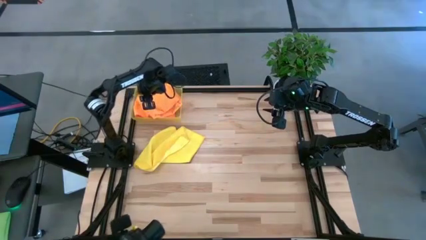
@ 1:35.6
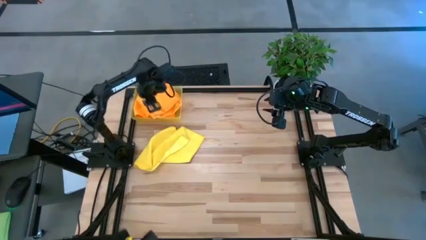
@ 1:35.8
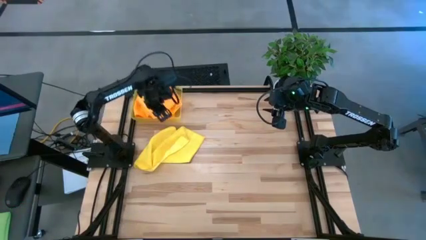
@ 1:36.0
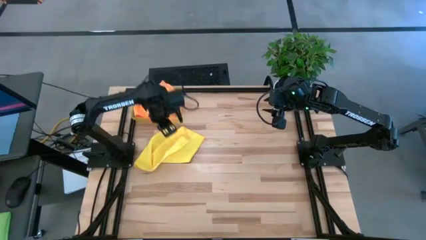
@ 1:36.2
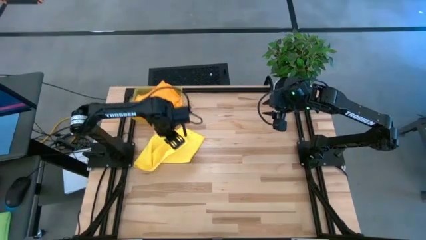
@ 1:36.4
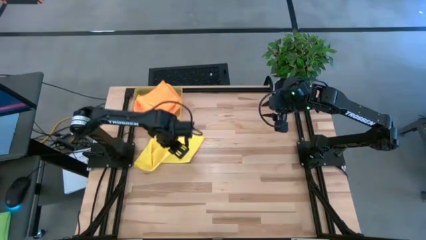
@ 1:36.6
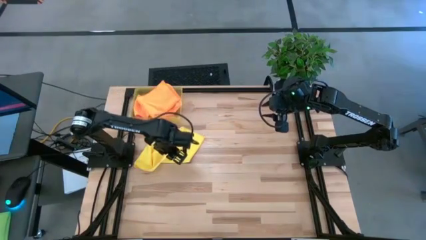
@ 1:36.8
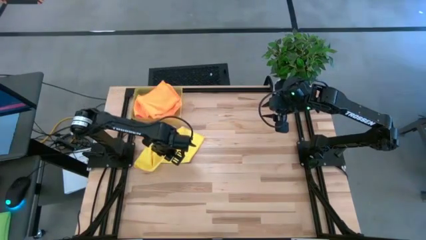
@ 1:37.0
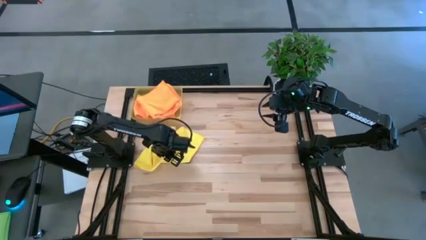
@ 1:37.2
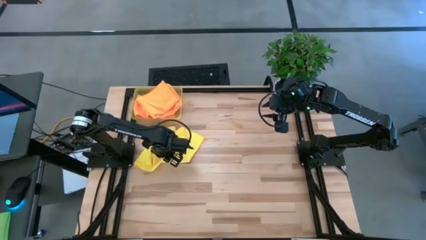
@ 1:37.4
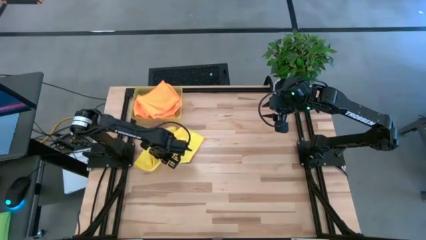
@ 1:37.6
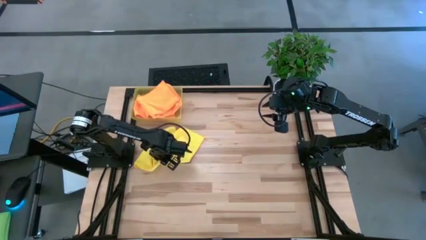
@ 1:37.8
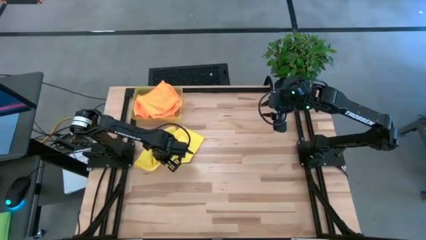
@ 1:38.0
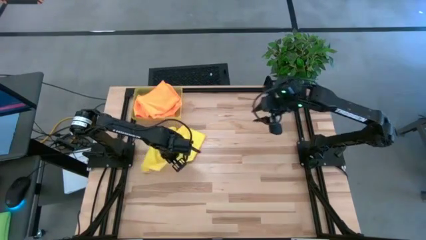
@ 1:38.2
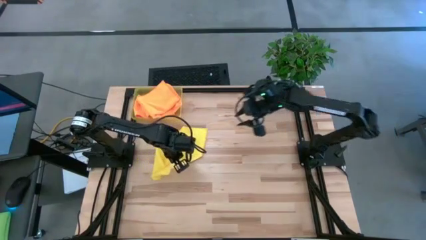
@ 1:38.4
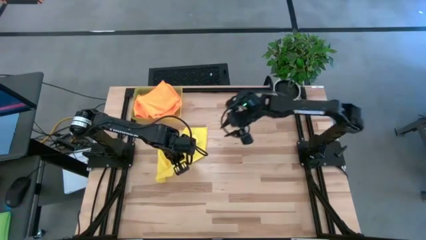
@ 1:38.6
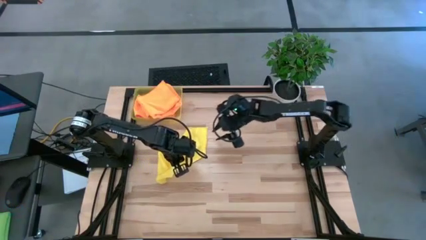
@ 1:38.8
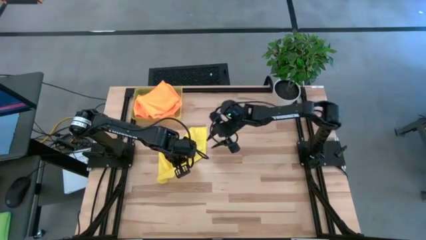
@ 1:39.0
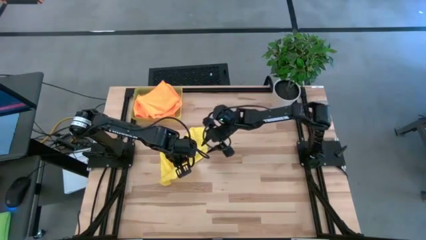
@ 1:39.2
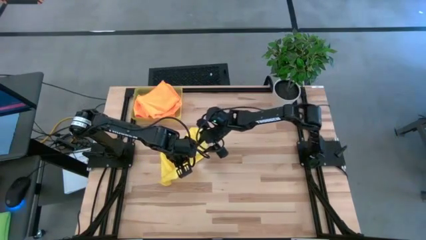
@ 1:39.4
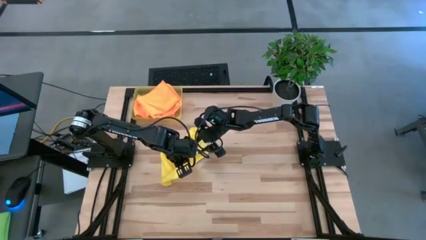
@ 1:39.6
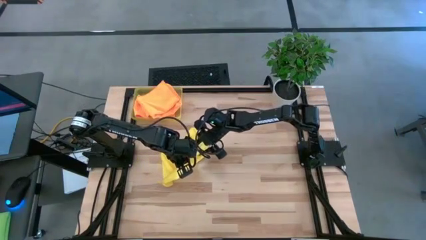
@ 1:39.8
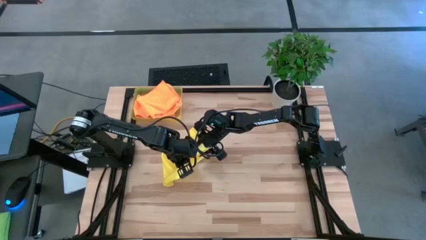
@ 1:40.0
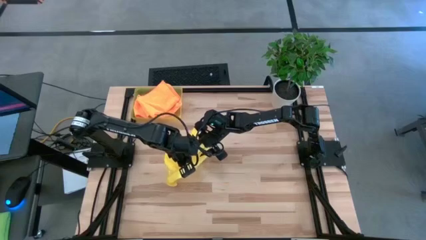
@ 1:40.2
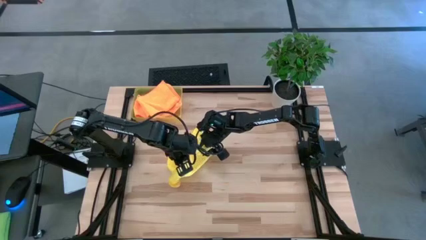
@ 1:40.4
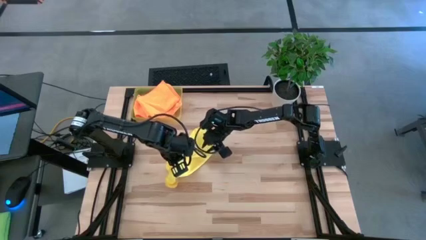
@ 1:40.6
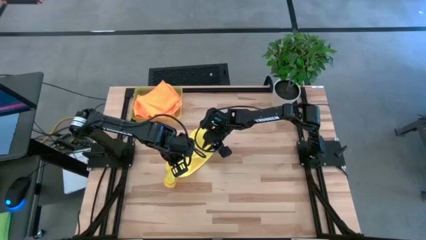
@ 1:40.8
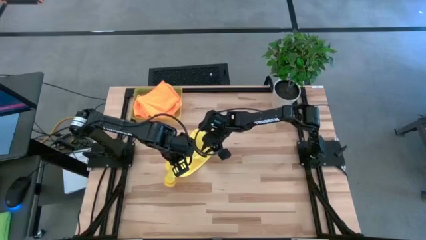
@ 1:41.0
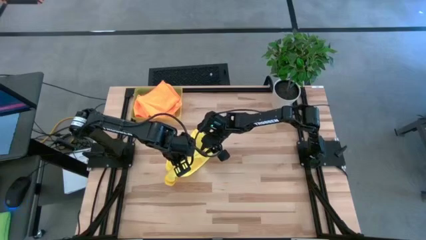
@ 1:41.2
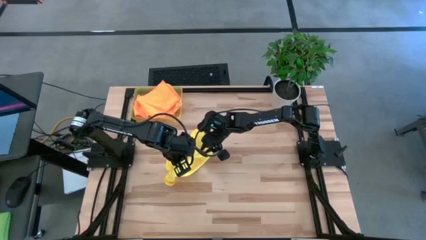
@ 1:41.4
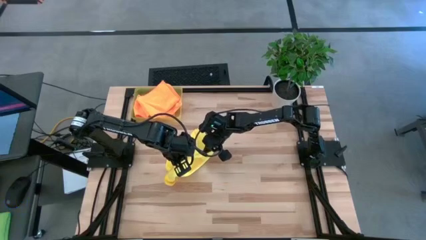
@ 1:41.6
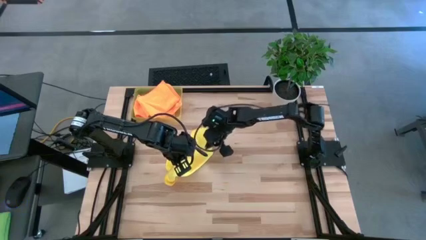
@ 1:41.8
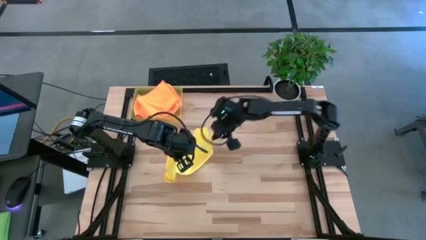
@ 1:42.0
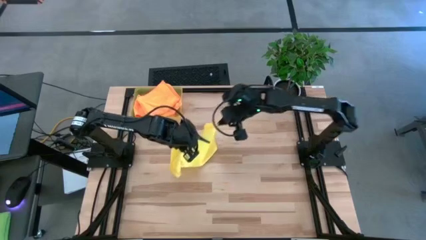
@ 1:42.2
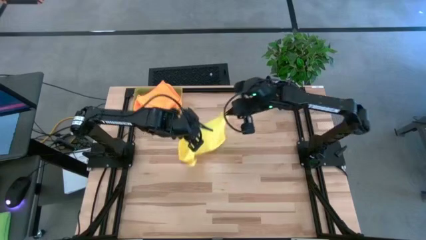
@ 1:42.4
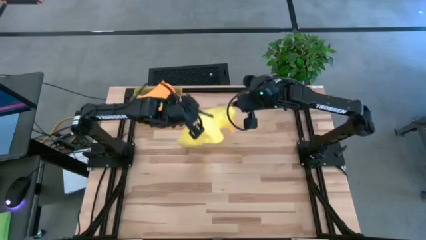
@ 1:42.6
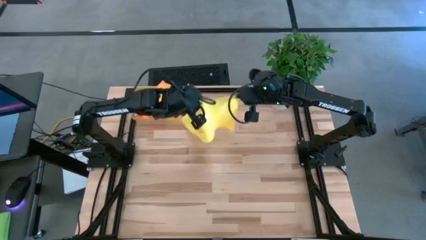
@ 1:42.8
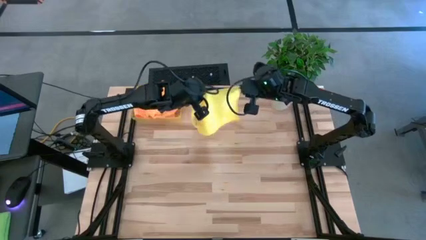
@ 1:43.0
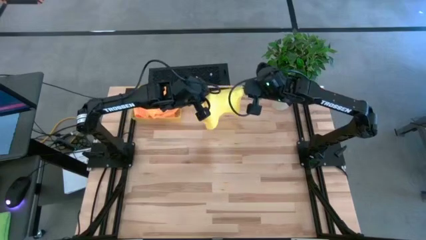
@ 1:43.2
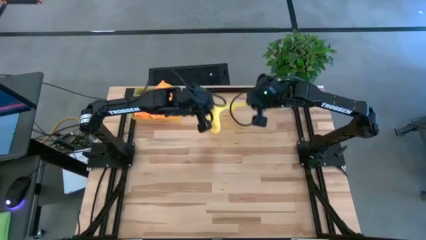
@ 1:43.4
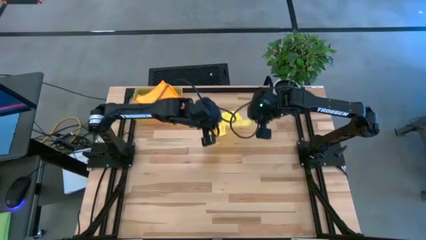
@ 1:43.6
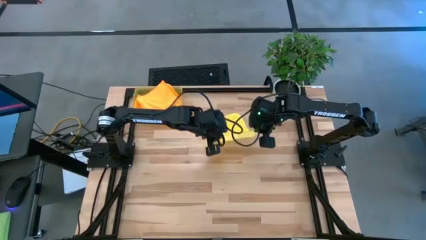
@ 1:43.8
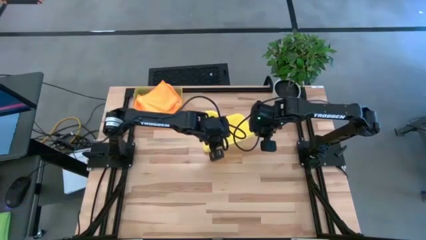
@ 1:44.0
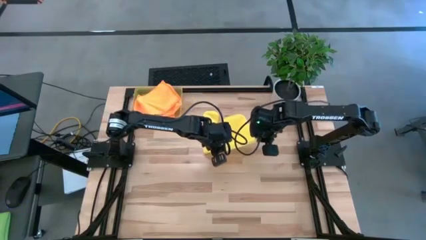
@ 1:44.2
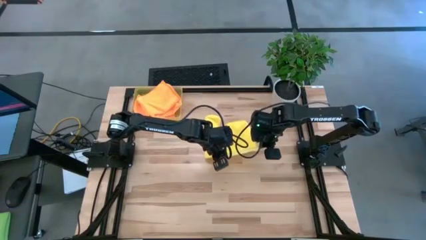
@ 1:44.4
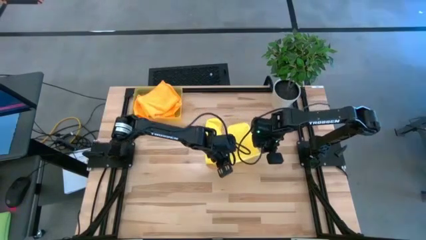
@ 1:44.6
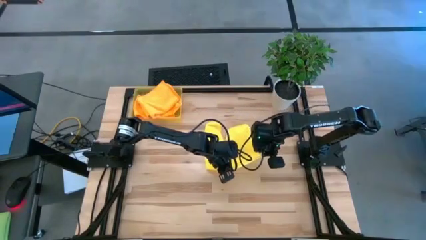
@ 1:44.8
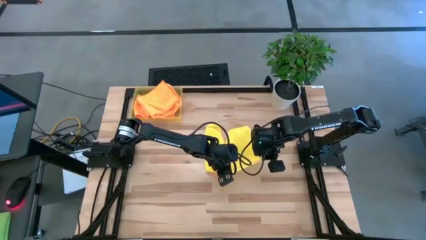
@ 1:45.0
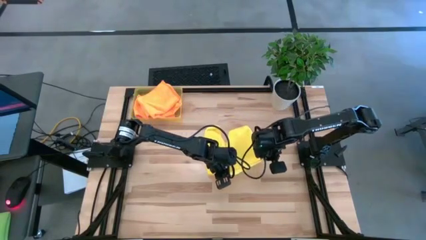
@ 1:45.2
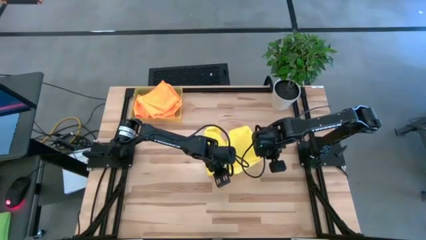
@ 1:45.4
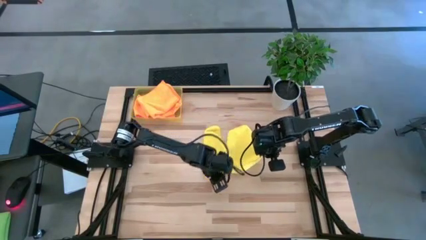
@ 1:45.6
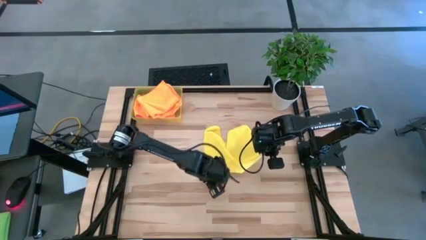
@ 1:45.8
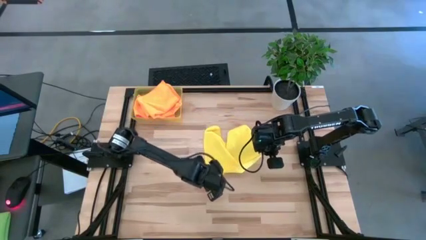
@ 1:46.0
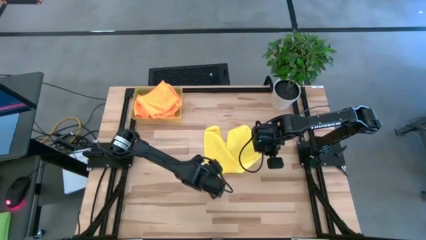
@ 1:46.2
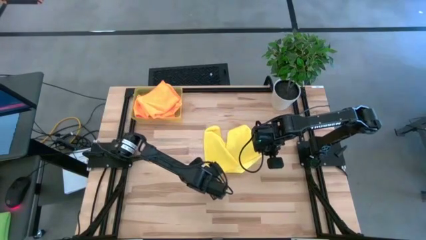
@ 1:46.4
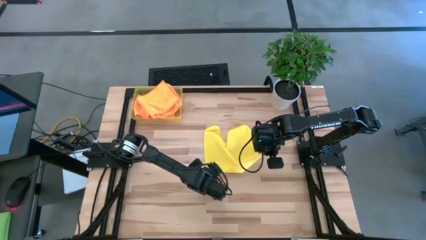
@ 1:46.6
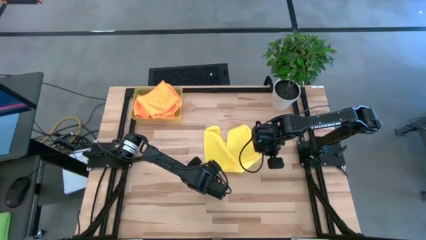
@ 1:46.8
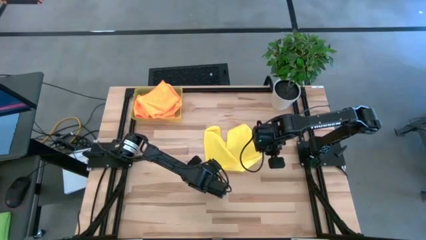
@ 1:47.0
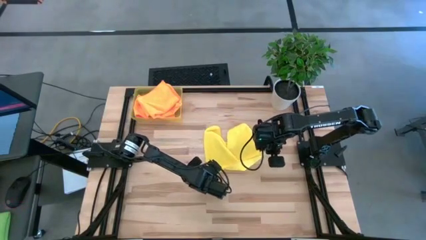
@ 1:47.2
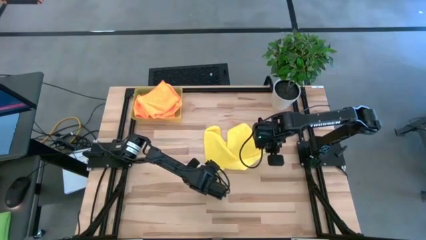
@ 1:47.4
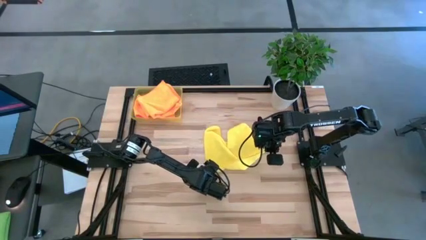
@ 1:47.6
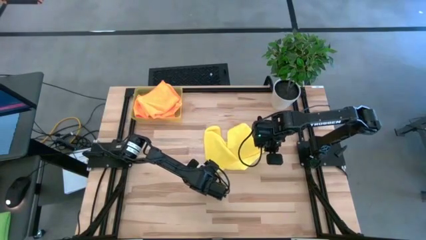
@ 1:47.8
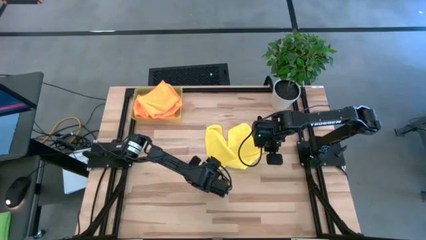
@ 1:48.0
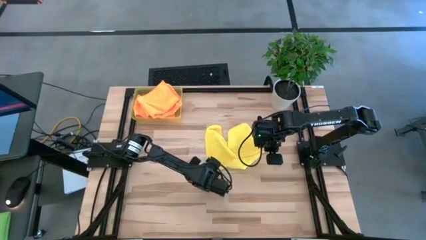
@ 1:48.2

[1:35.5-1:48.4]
Task: Fold microfiber towels
Fold the yellow microfiber cloth

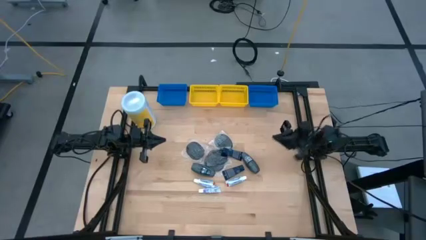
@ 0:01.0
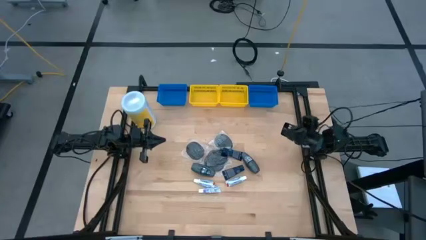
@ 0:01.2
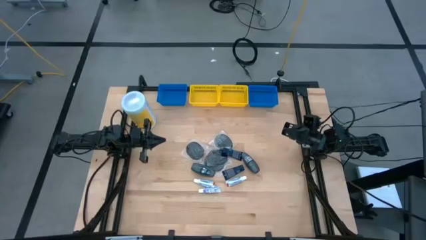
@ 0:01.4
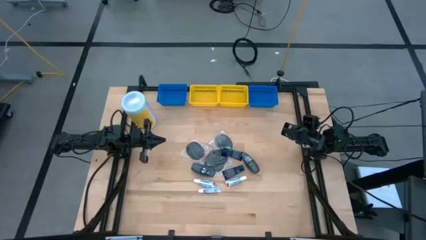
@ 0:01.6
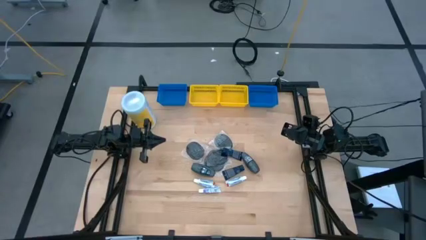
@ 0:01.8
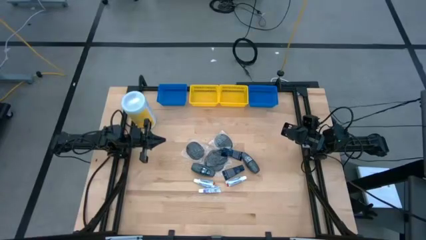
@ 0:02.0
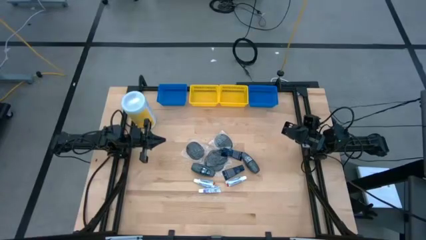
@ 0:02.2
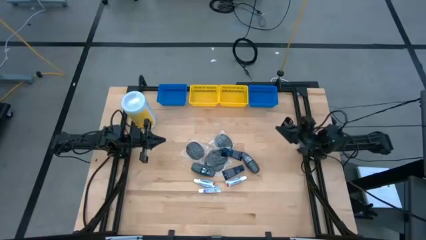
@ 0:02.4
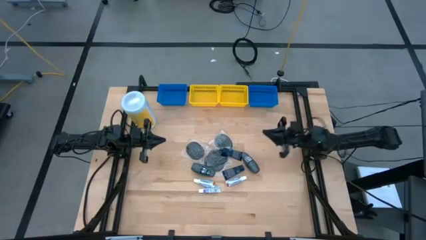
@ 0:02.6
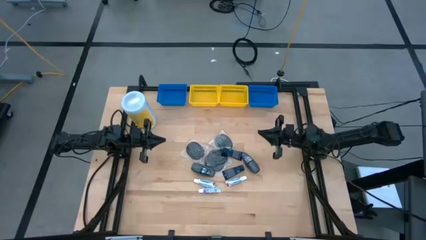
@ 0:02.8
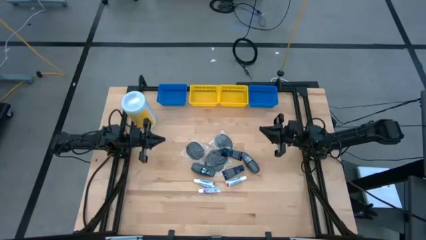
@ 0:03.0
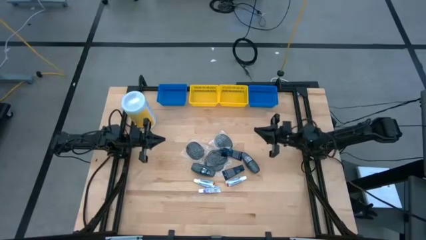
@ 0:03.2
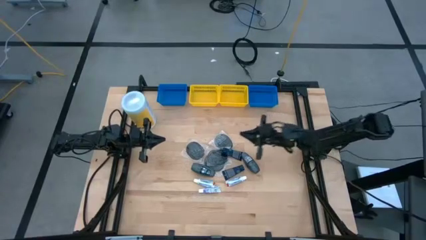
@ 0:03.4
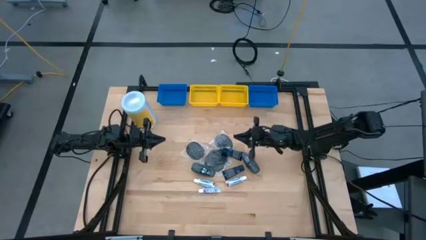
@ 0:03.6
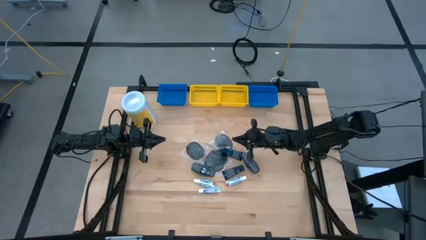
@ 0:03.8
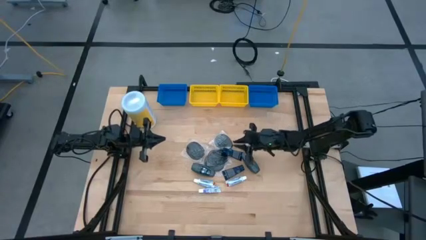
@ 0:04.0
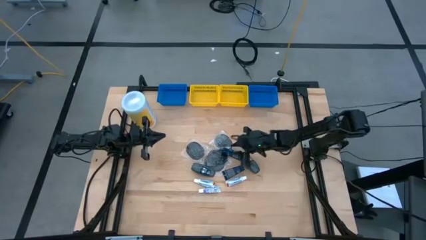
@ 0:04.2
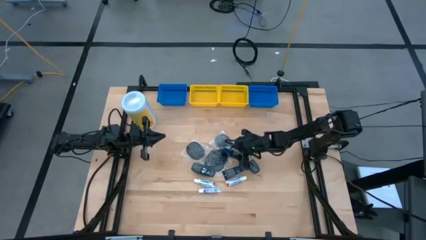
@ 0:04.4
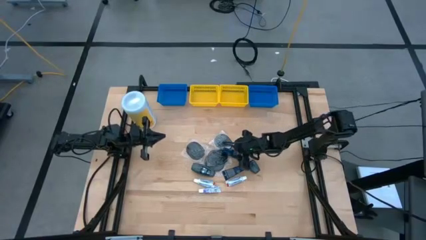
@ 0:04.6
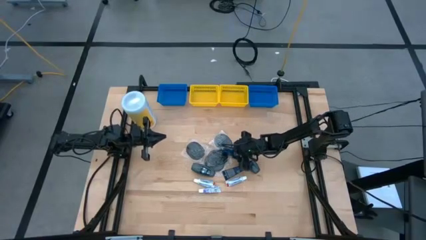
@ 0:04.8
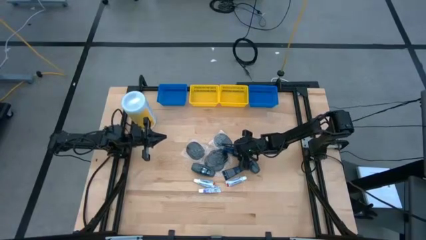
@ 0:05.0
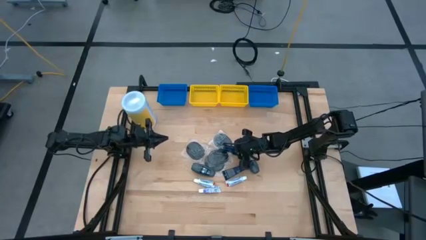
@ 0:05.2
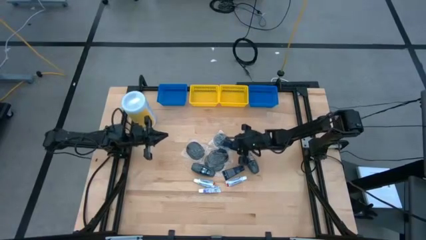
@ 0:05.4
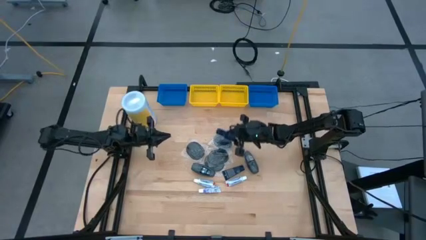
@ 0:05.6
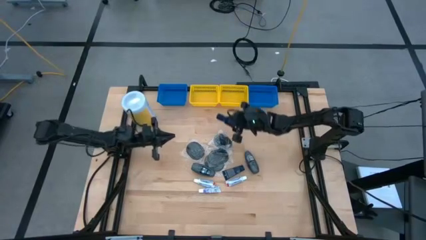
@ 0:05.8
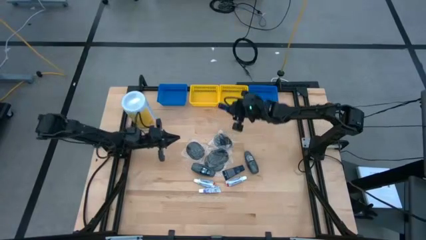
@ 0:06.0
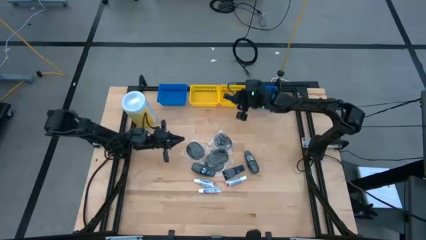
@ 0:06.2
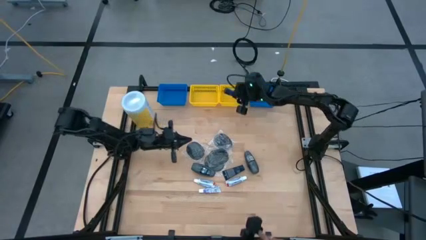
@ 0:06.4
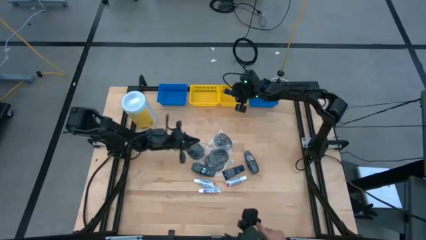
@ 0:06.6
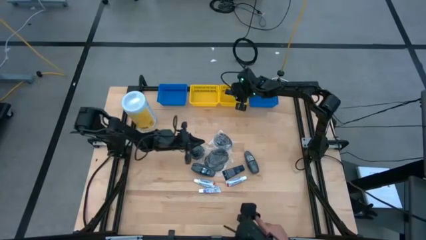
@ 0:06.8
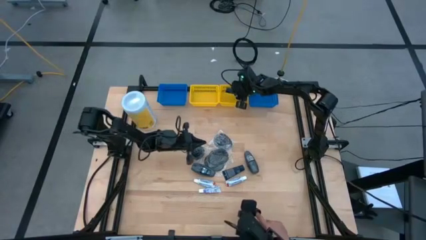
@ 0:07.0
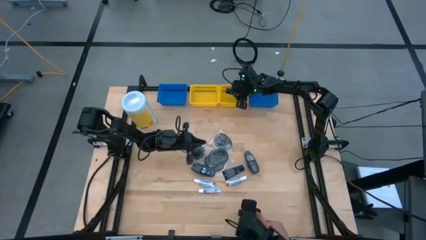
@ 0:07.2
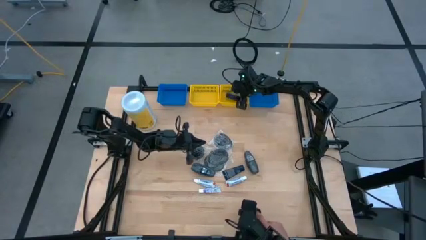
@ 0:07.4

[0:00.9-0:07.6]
Task: Pick & Place Travel size toiletries
Put the shave cream into the right yellow bin
